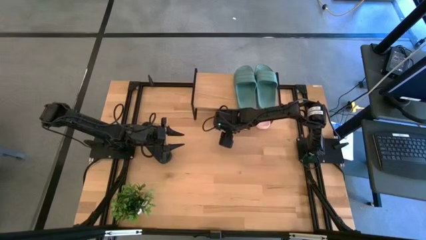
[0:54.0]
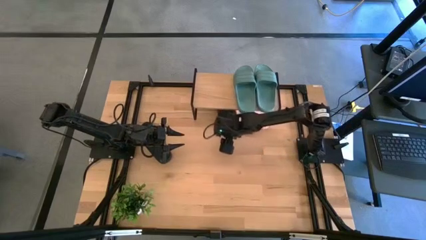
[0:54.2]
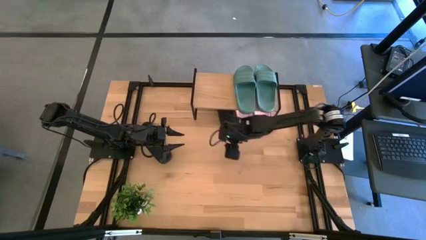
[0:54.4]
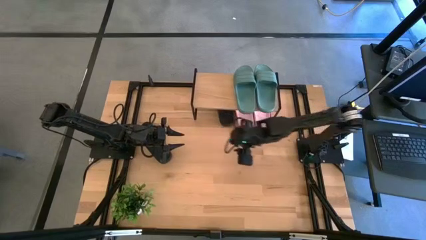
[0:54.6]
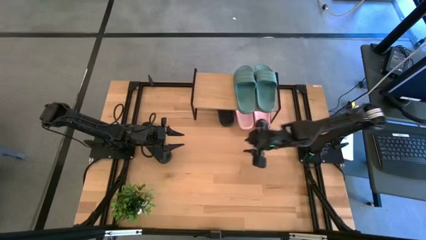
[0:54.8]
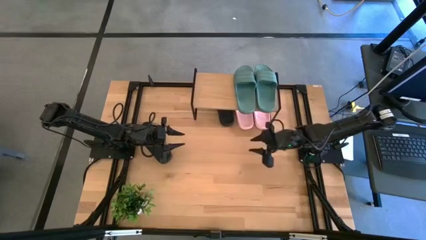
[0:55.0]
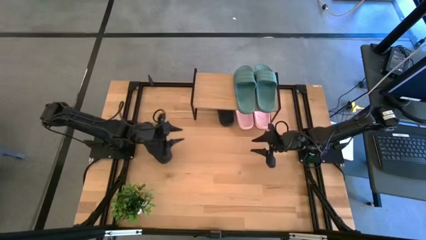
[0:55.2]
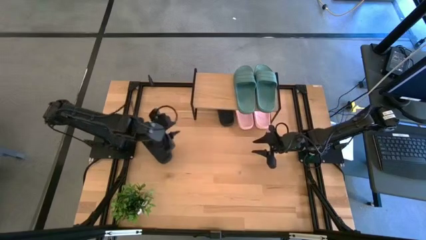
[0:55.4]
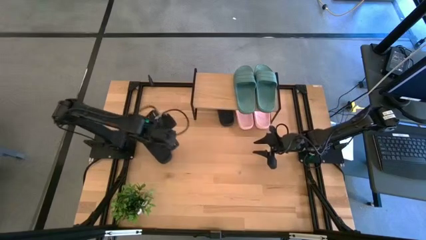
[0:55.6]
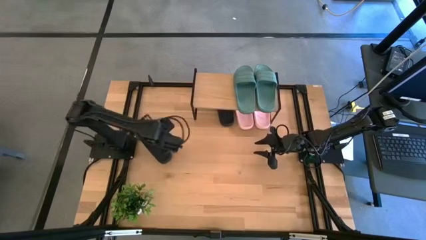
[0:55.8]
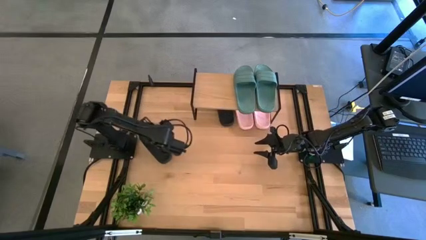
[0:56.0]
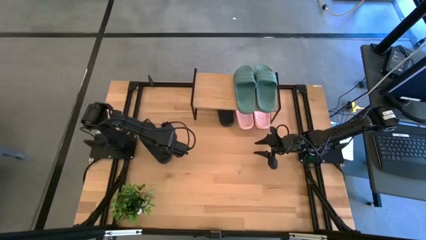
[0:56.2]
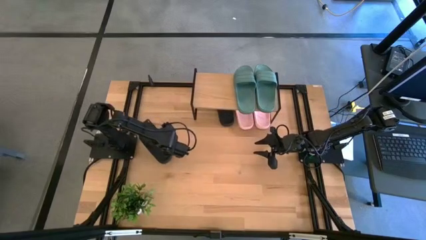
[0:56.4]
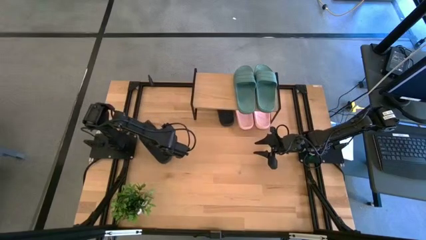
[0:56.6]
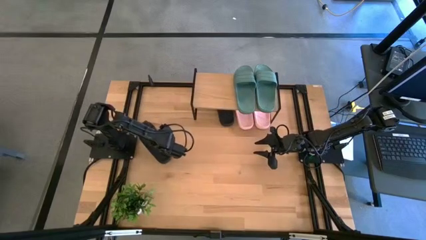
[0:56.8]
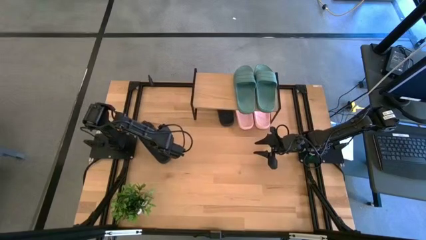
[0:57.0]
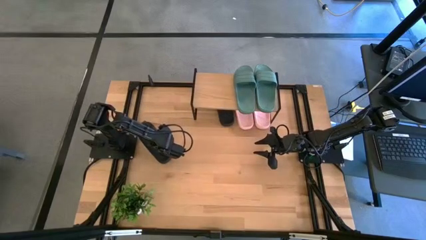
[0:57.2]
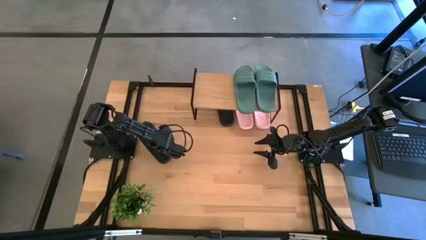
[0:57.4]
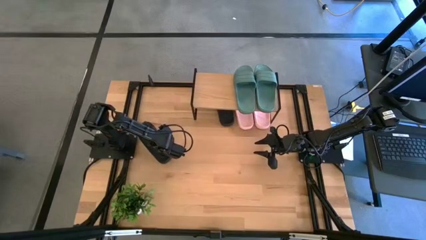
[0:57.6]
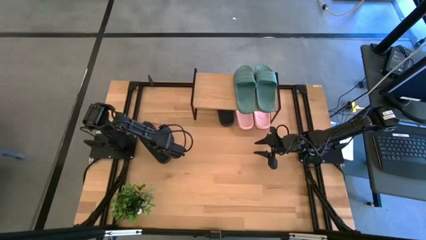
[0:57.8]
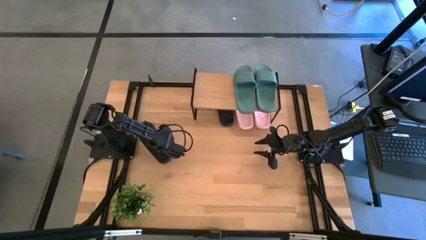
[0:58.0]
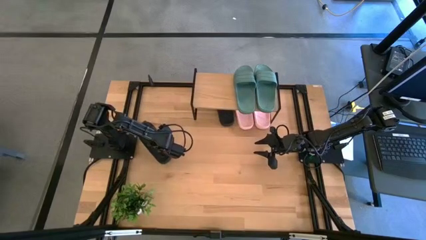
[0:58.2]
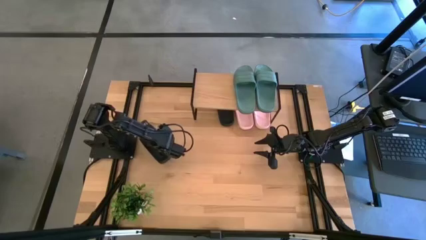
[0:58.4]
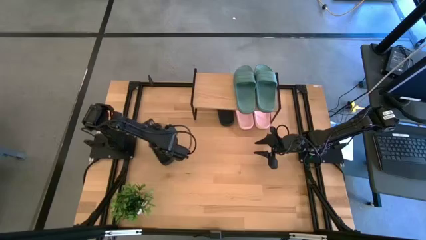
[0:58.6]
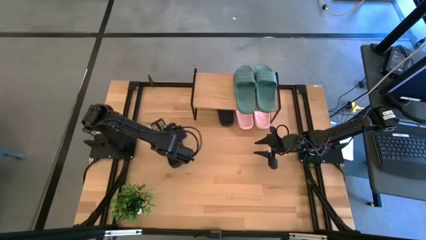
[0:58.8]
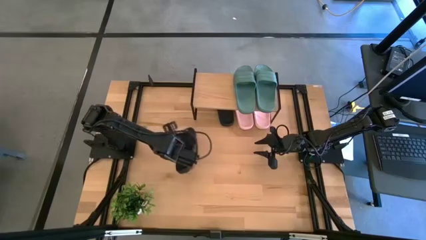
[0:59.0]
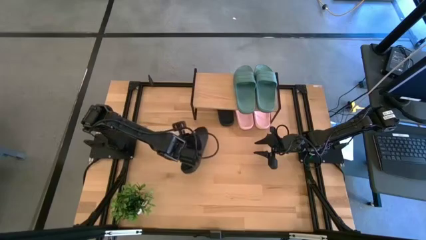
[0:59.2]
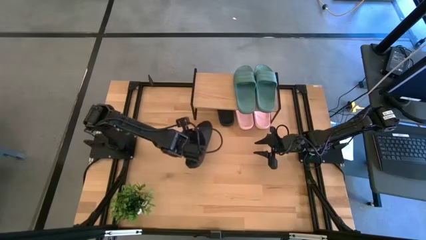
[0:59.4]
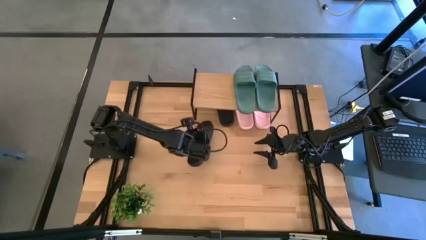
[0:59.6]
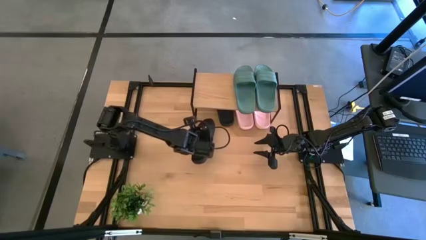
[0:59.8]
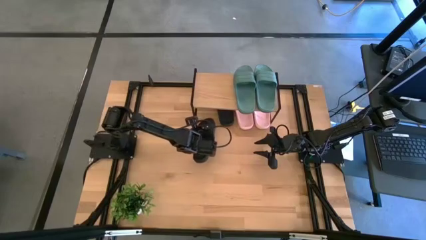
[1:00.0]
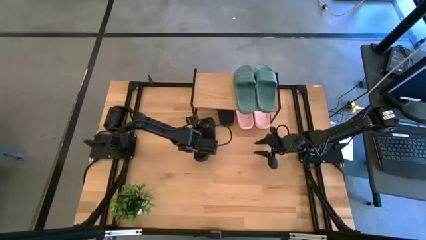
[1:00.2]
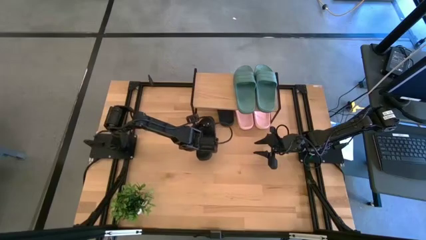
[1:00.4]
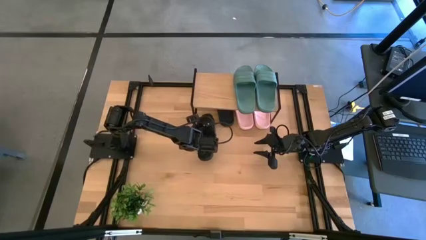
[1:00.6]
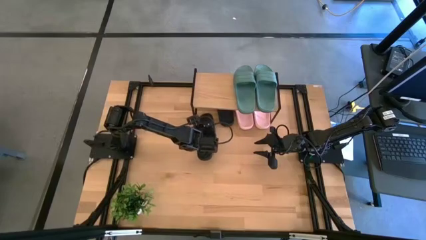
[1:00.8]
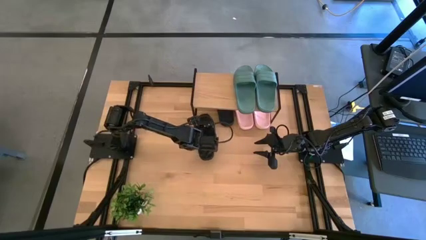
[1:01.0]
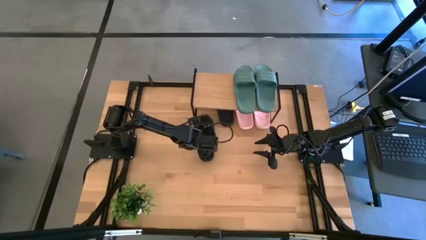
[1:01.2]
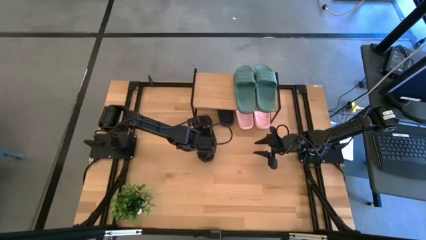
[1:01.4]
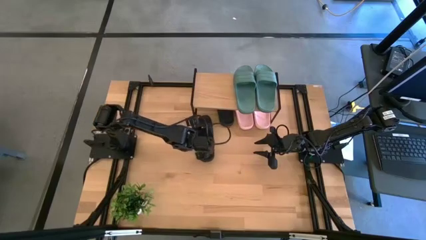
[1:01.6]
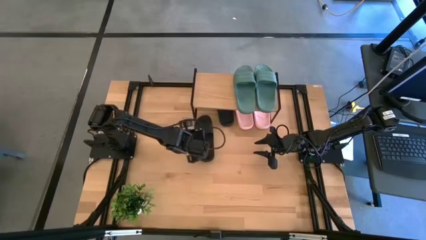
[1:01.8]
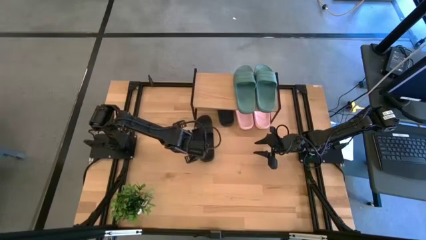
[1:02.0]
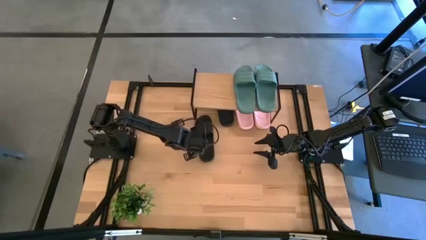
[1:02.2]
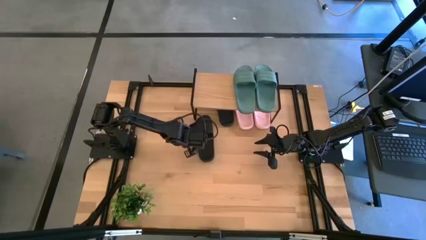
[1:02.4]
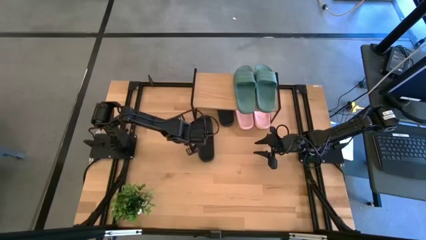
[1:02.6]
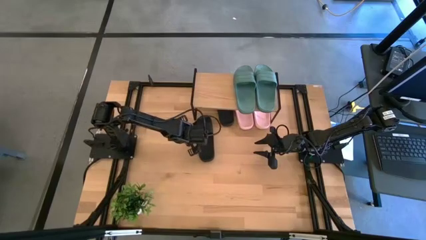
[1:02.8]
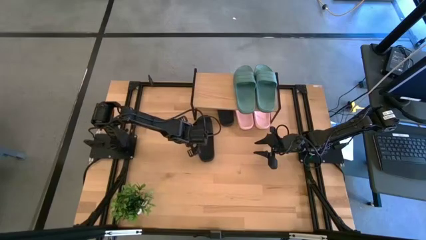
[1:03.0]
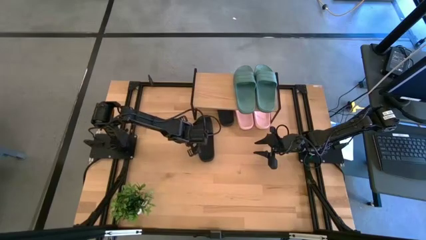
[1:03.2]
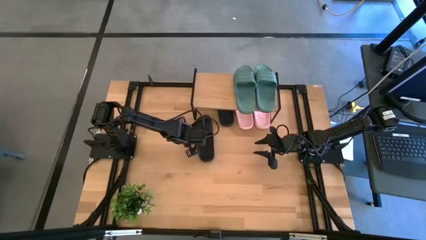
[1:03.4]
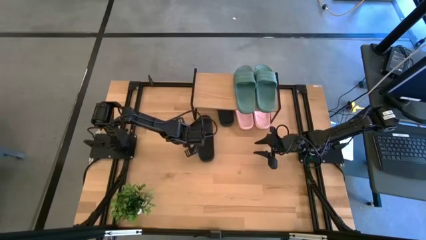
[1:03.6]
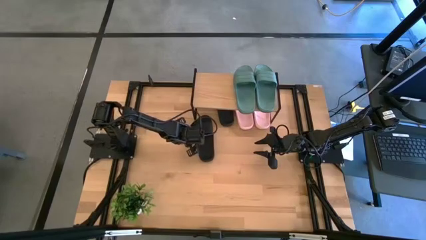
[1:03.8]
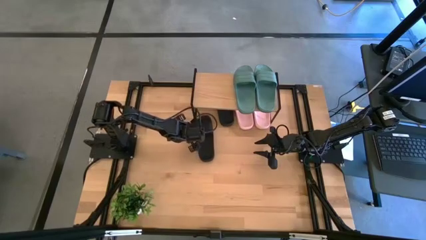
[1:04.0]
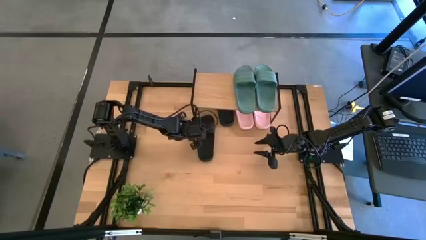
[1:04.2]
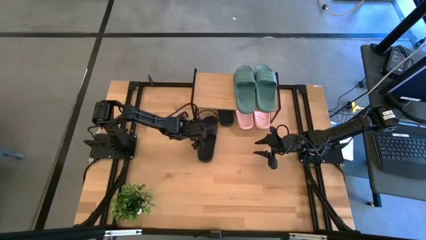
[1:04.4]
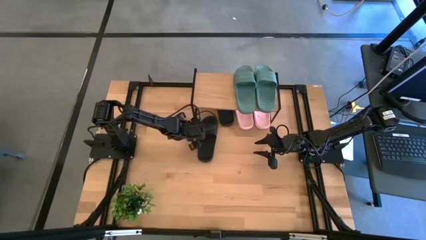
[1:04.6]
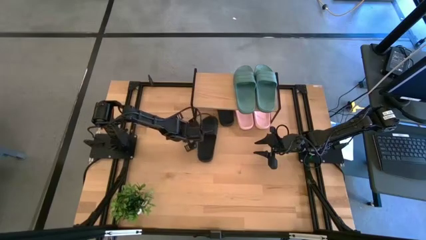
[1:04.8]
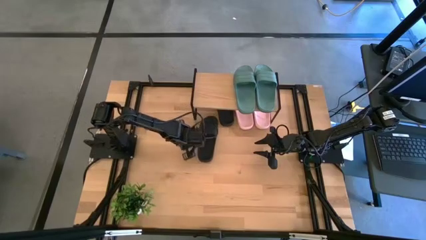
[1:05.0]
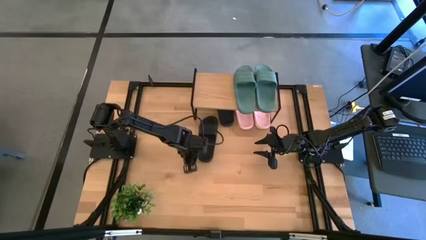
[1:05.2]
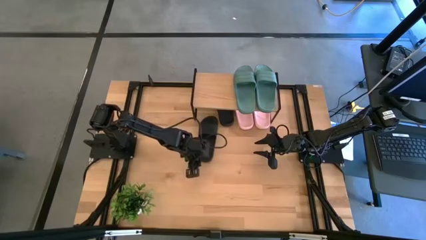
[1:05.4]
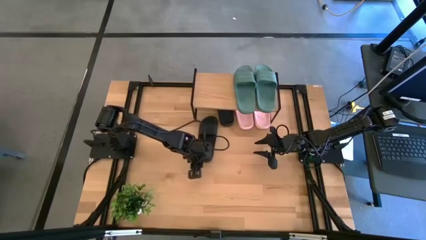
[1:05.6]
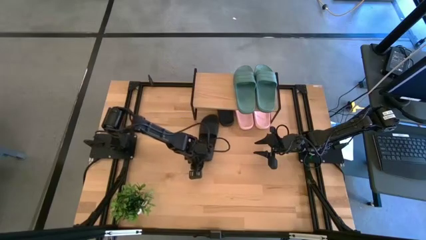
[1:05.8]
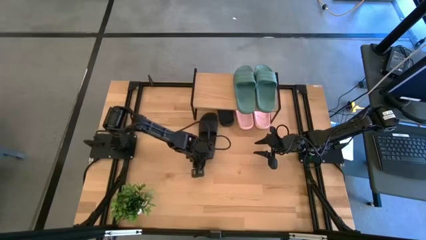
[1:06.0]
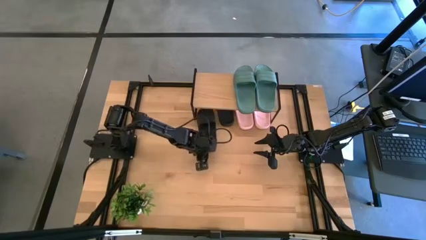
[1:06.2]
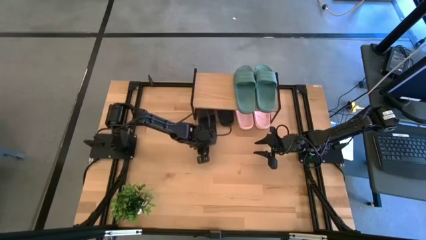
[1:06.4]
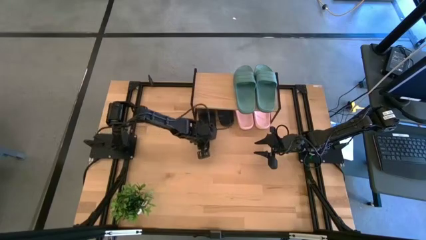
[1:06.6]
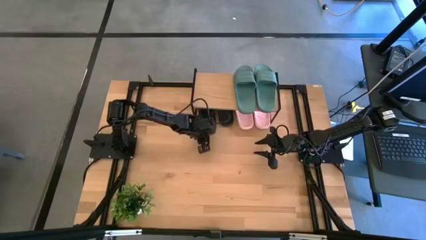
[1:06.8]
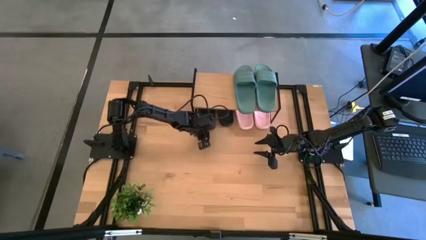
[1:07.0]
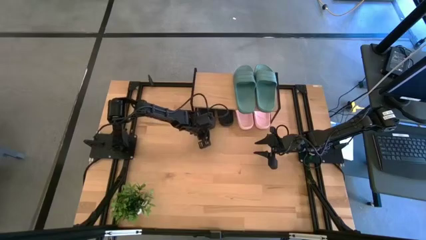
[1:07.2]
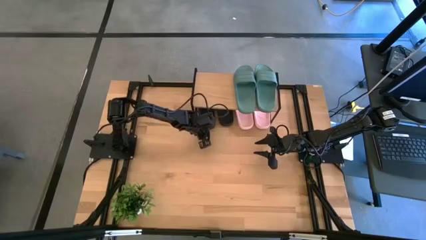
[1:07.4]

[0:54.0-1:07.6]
Task: Pick and place slides into the shelf
Put the black slide under the shelf
